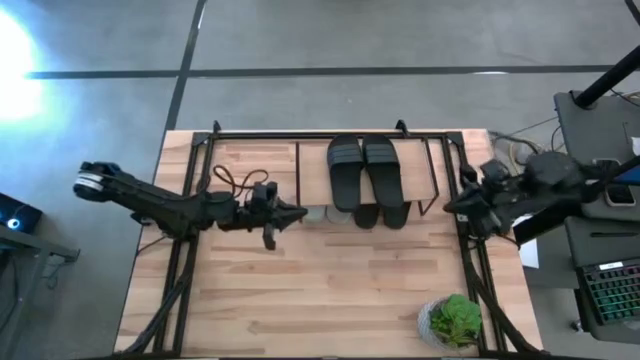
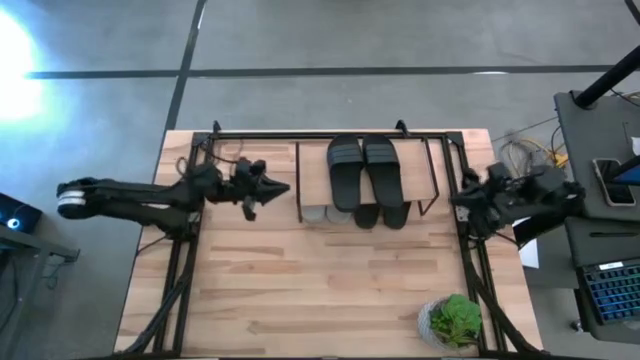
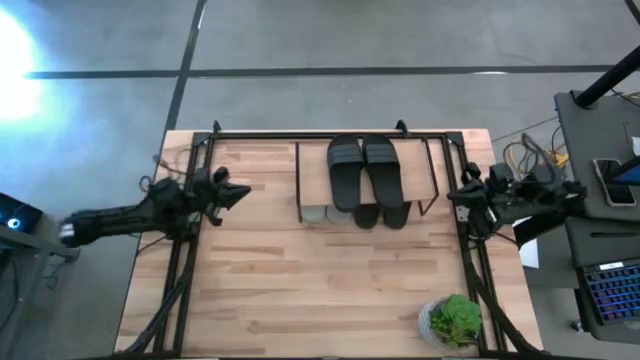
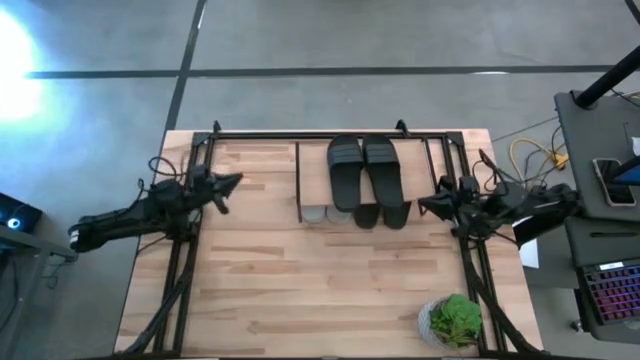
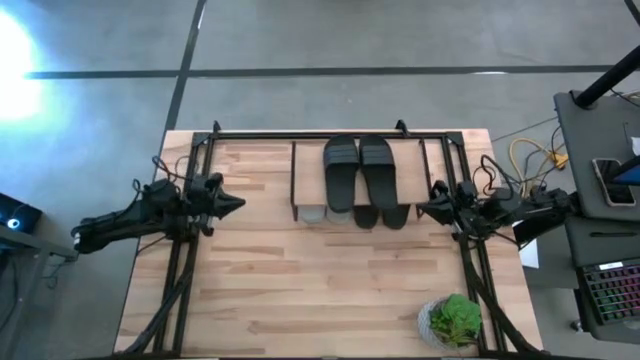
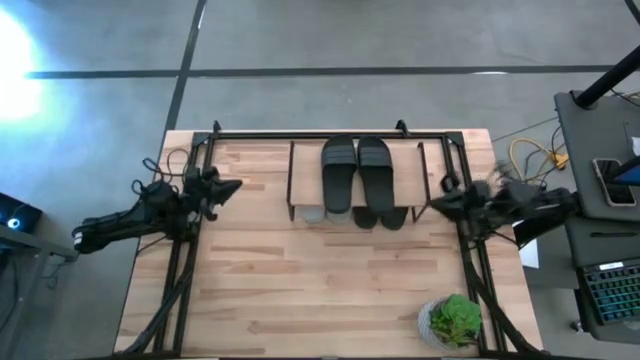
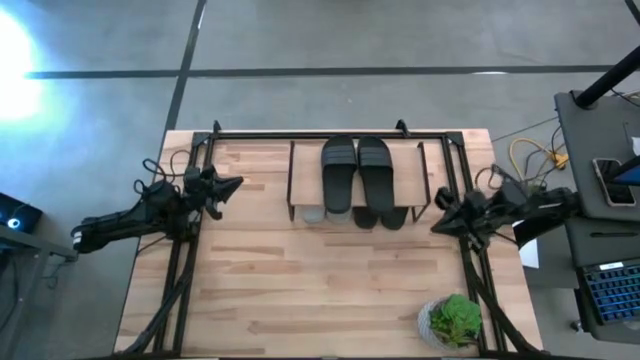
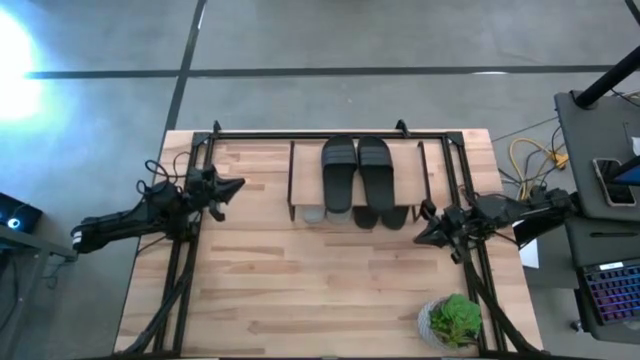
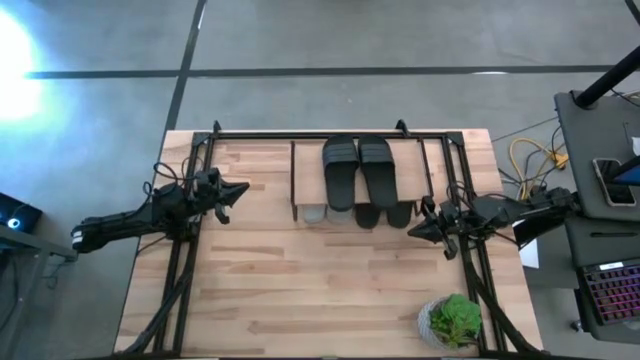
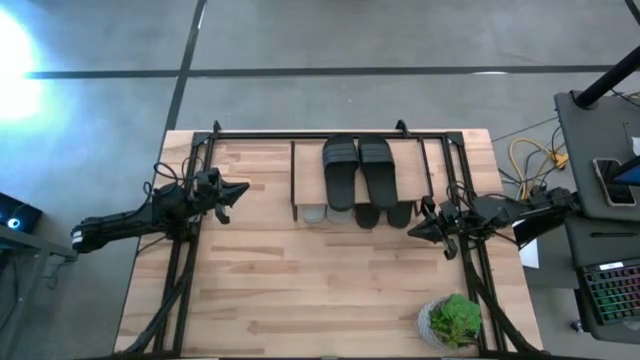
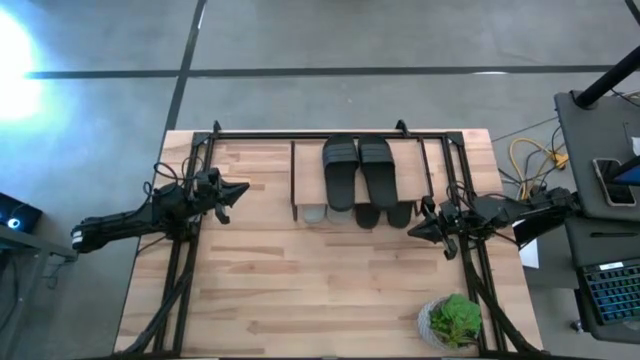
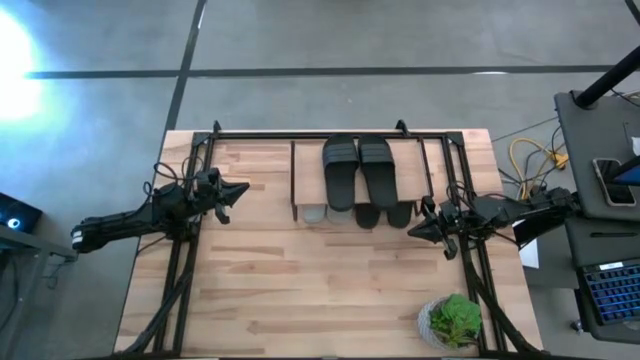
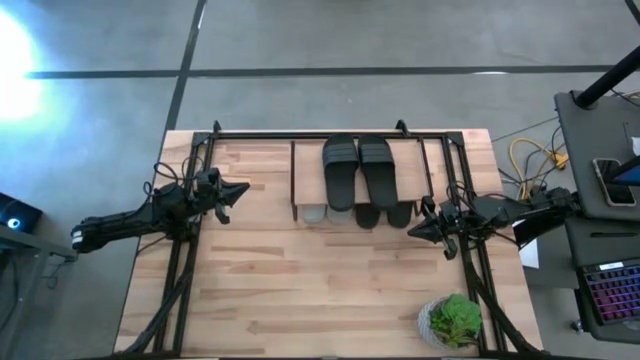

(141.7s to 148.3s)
Task: Pick and place slides into the shelf
Return to Home Position

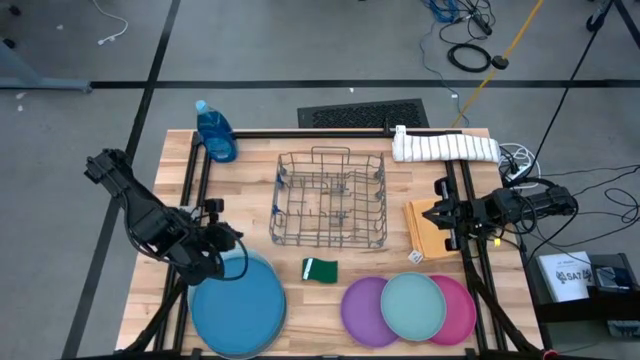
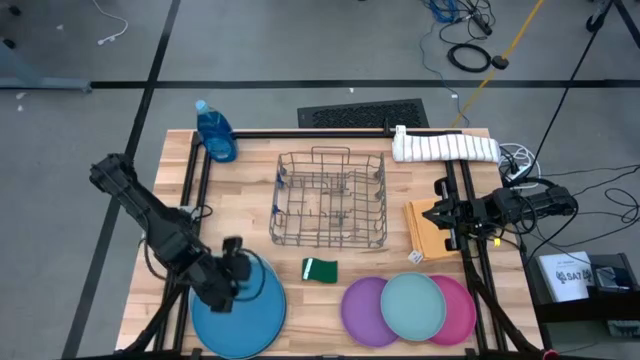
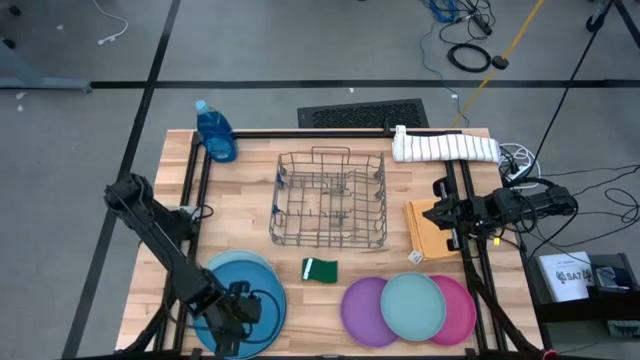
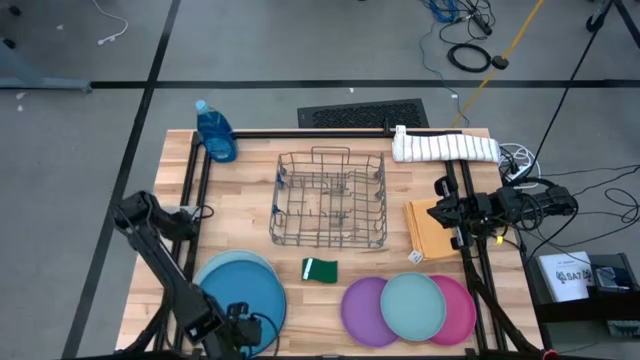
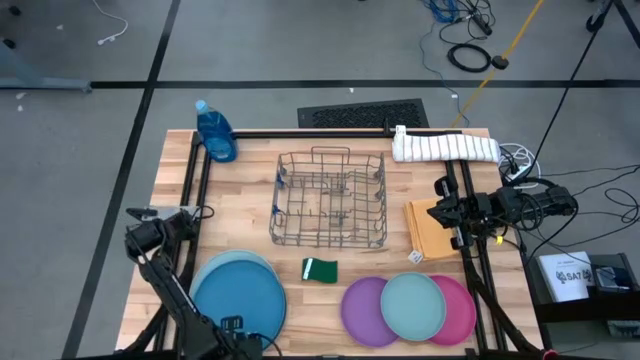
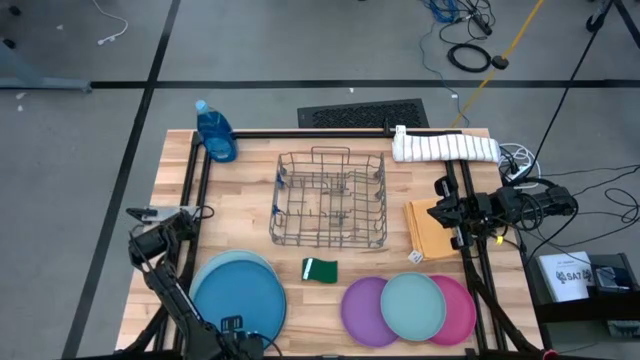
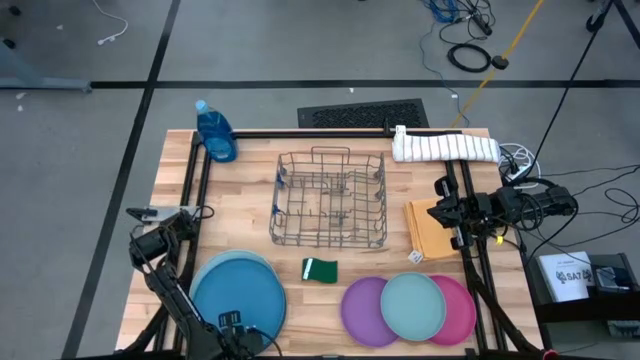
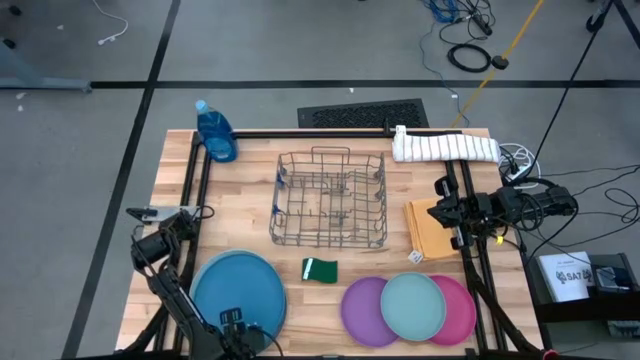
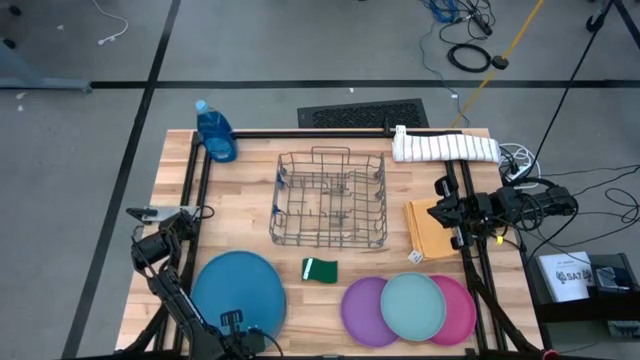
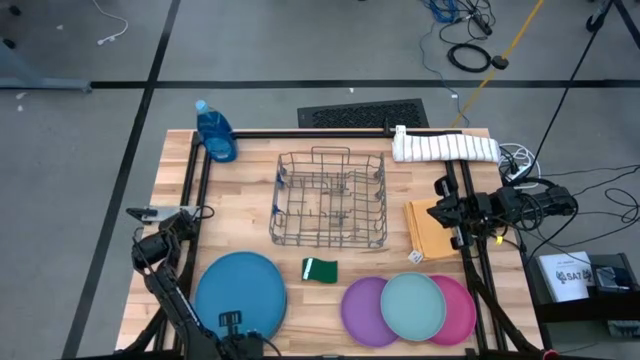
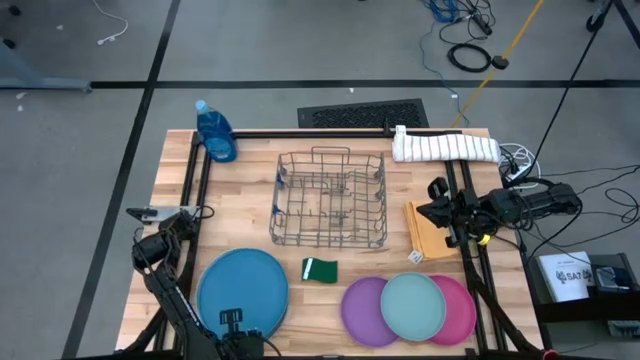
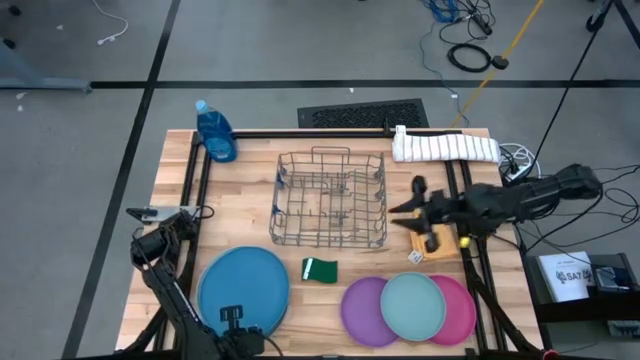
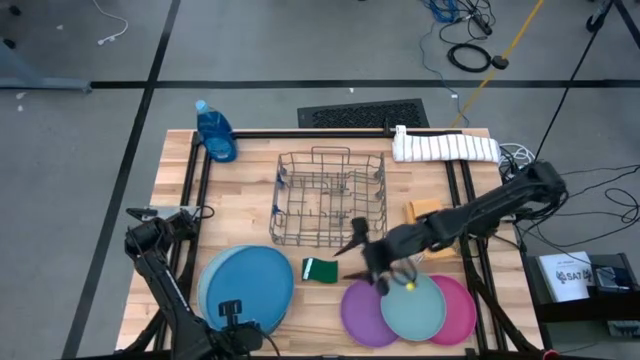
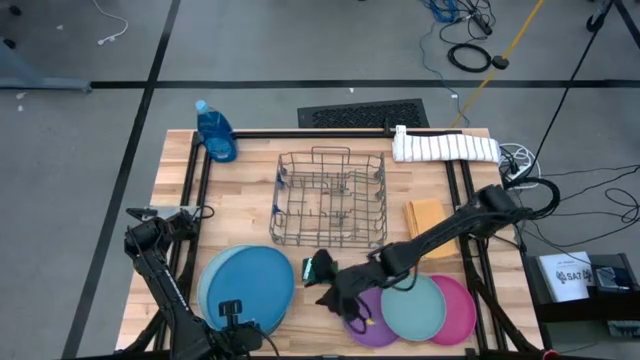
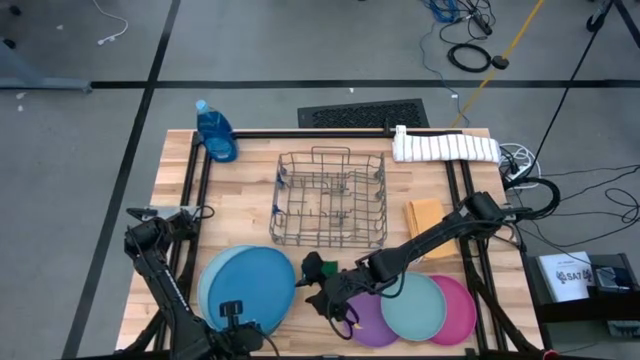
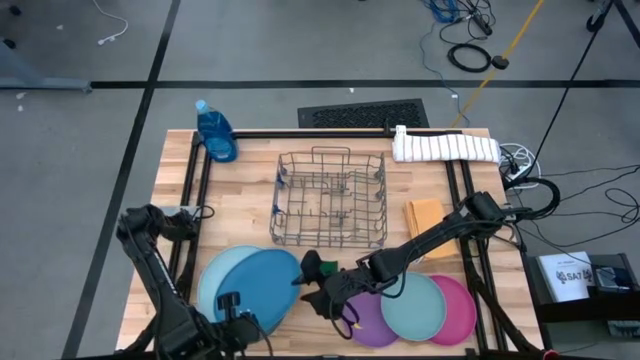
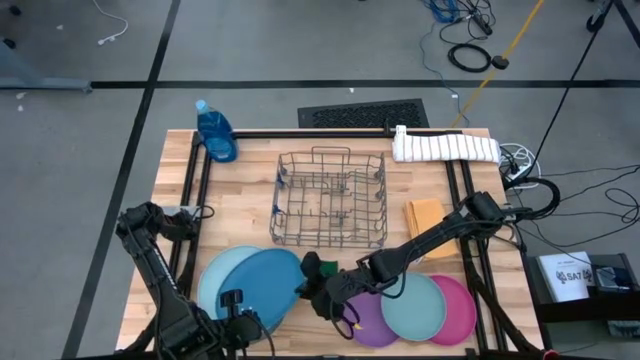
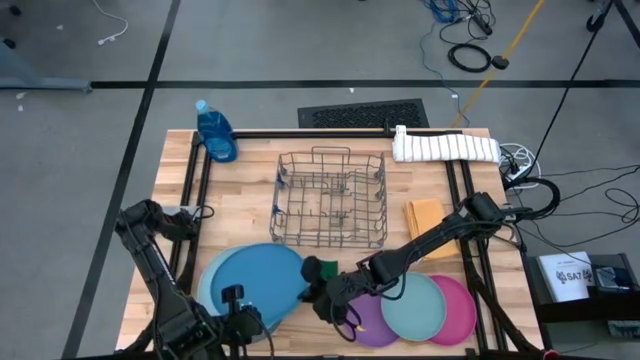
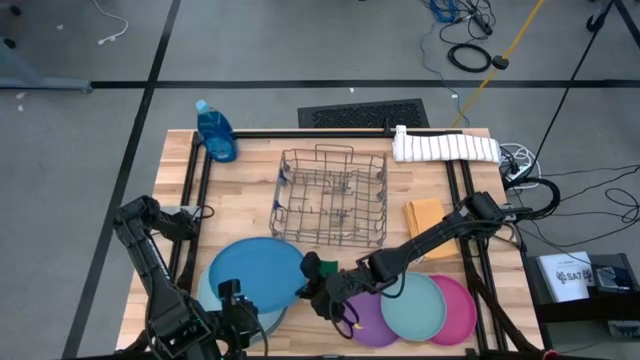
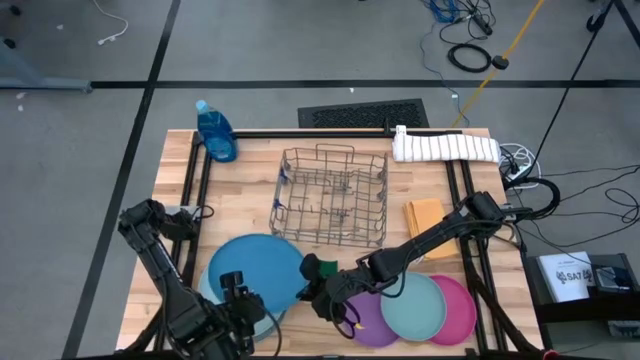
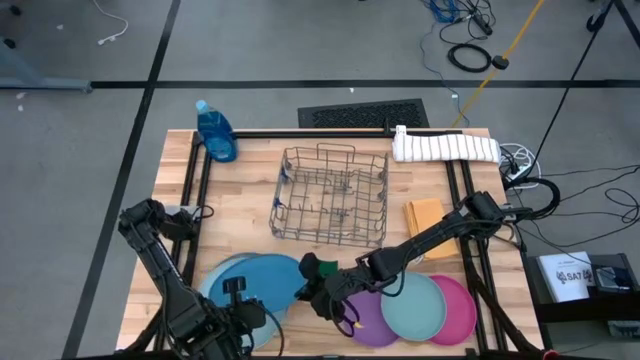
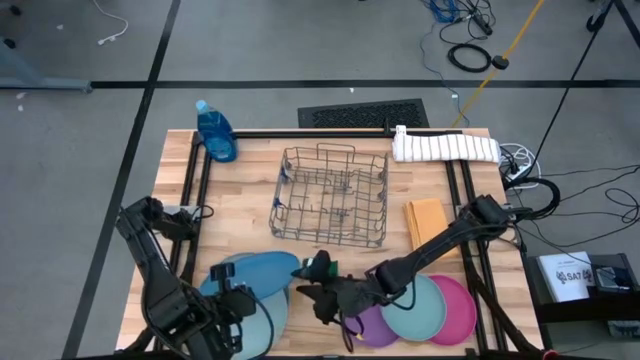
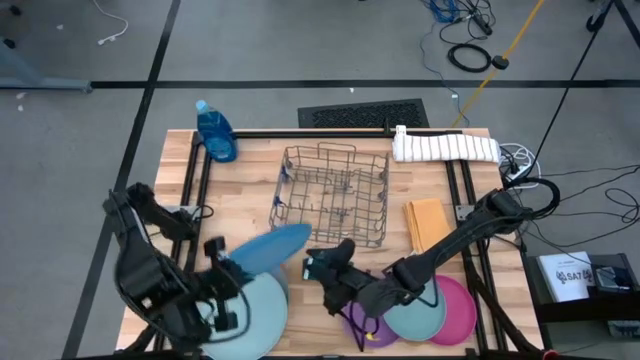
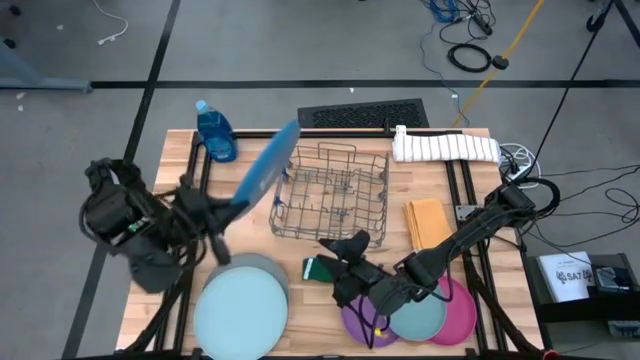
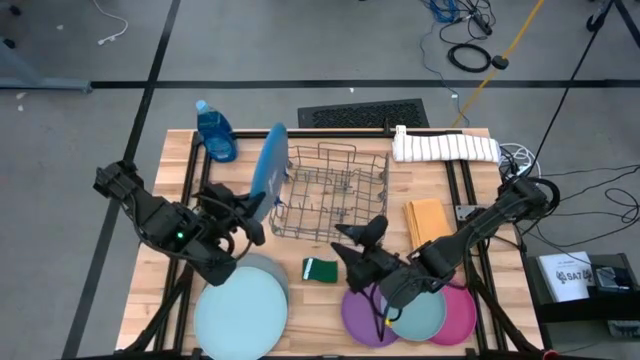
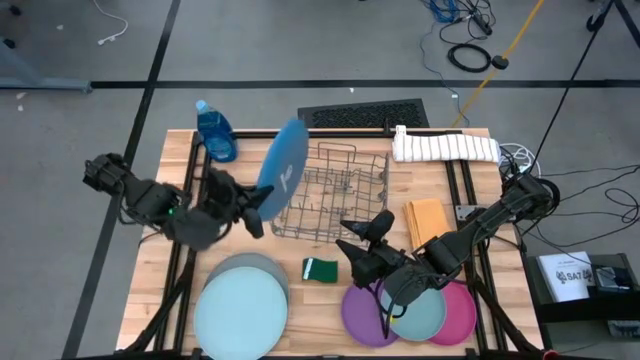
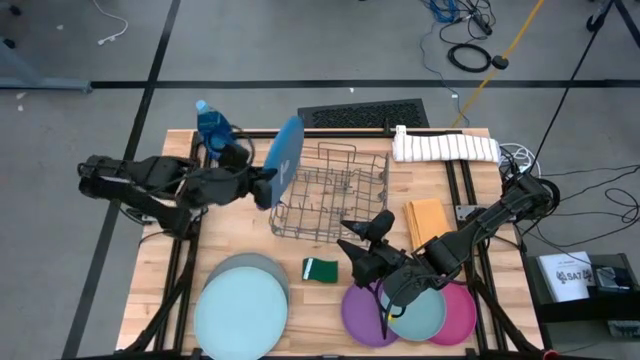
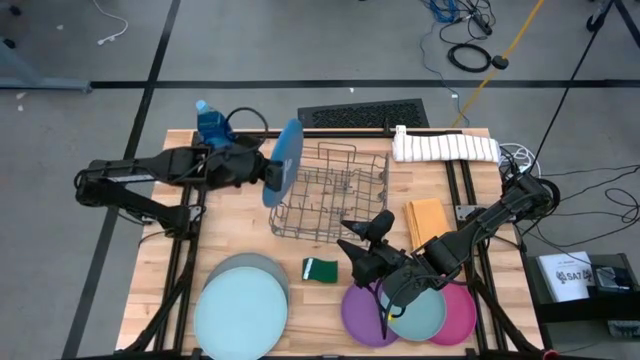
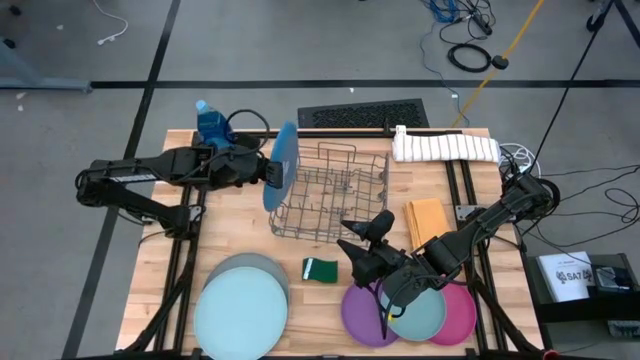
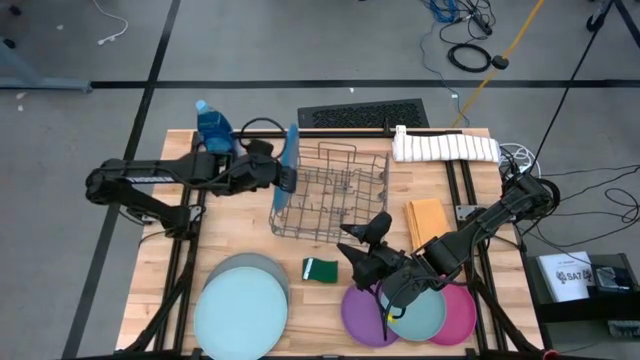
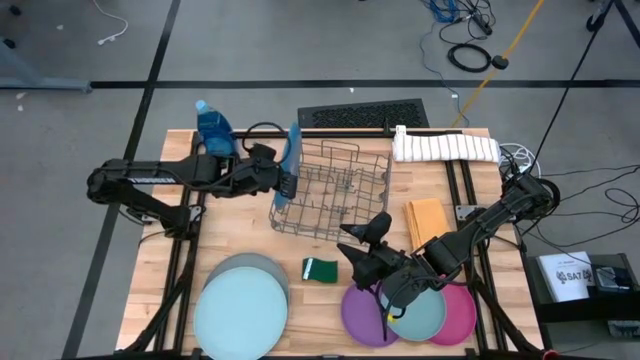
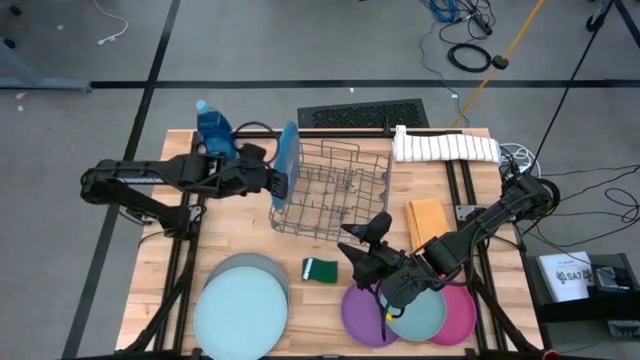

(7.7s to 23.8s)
Task: Sort dishes
Put the blue plate in the dish rack
